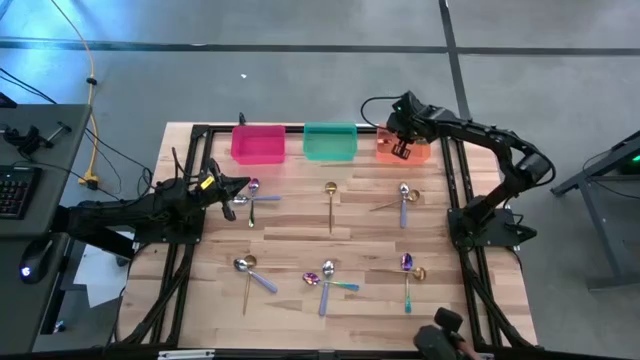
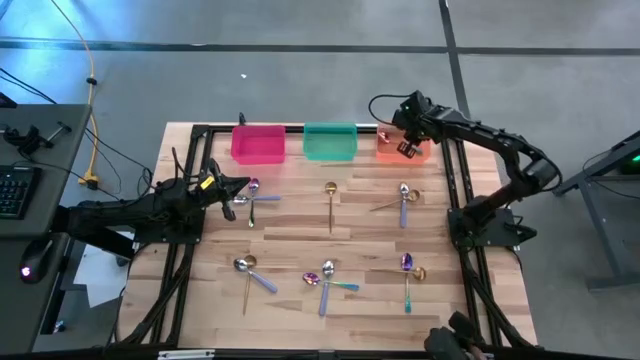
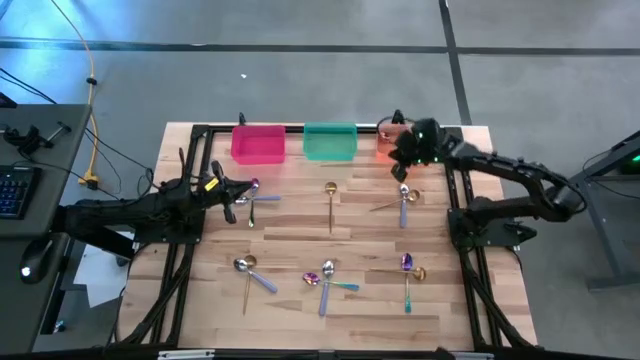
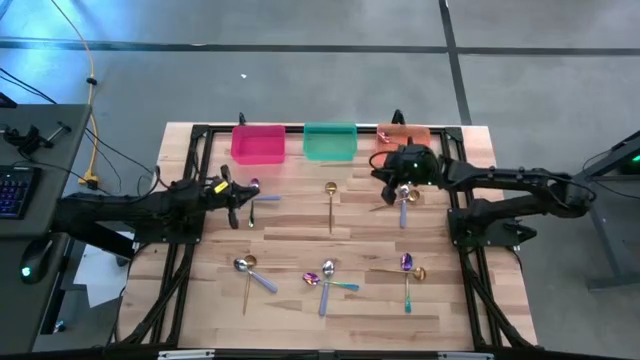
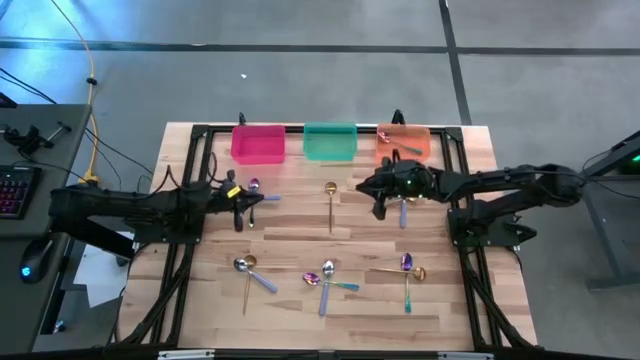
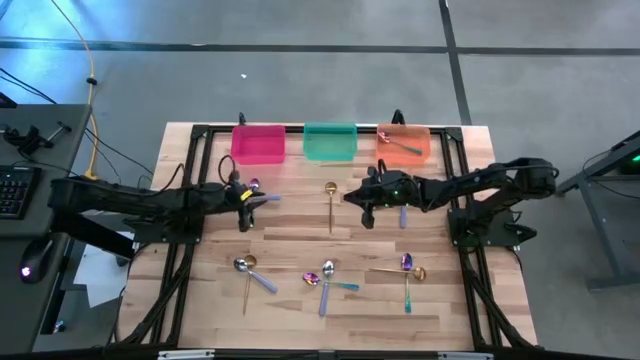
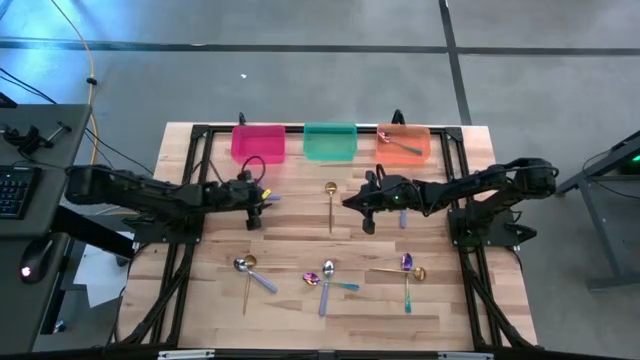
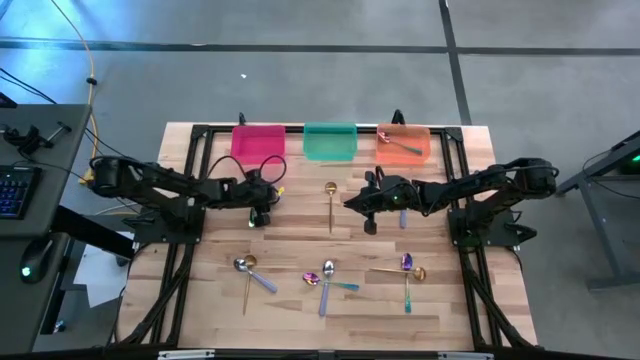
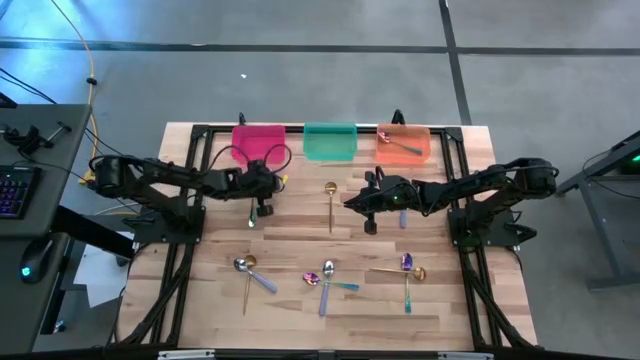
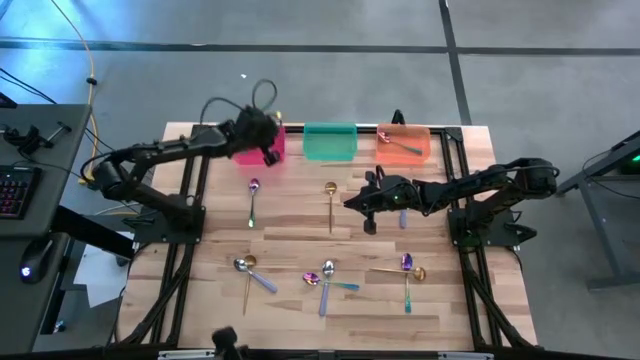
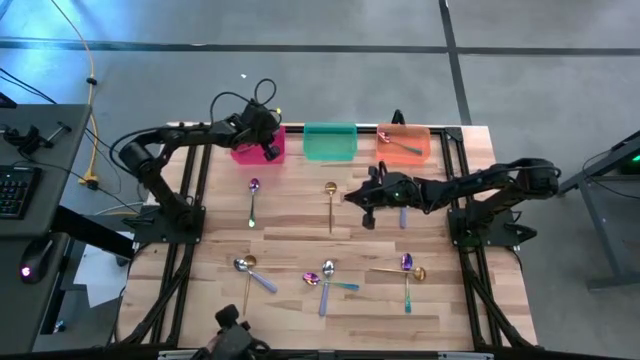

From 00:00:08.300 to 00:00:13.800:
Task: Sort silverware by color (type)
Put the top left purple spoon into the pink bin

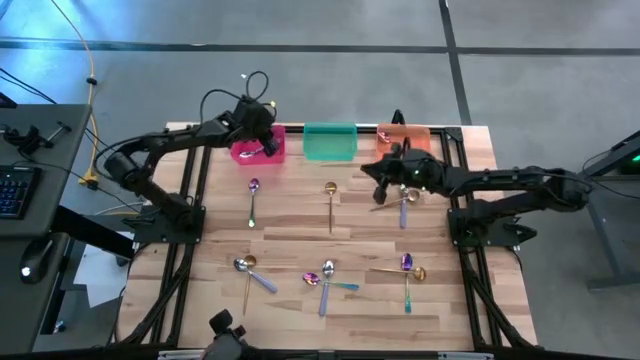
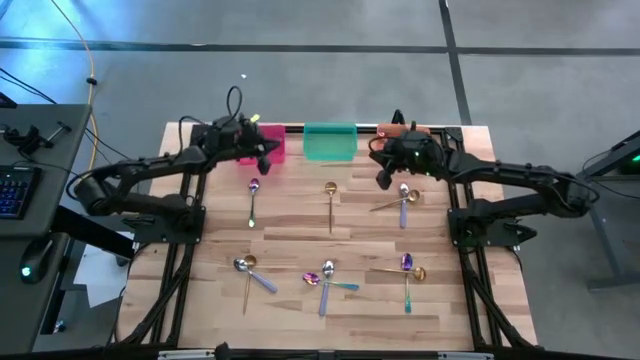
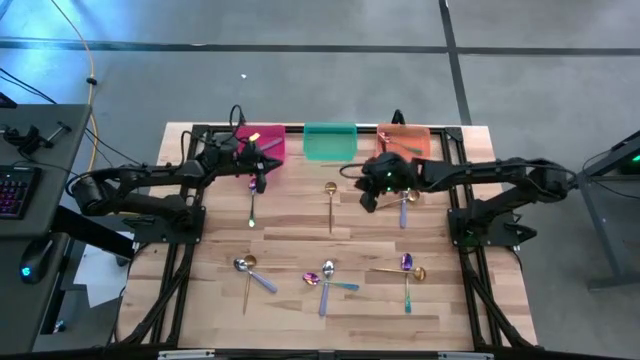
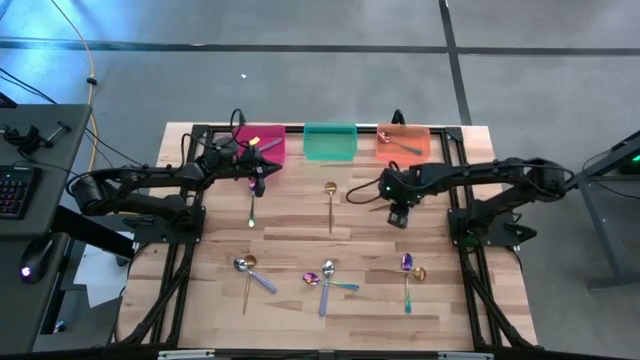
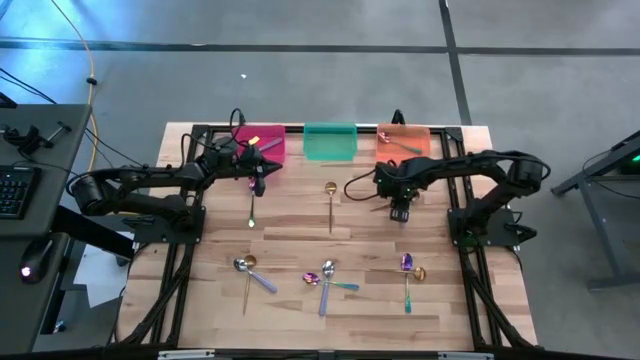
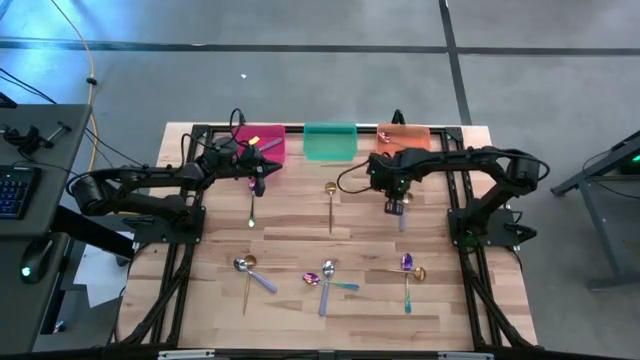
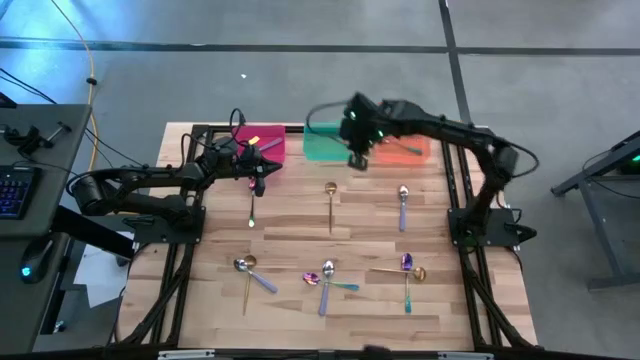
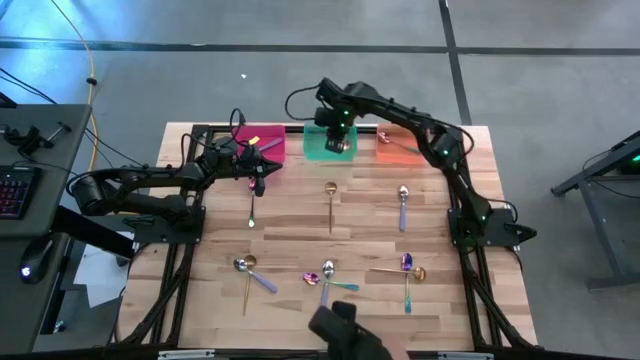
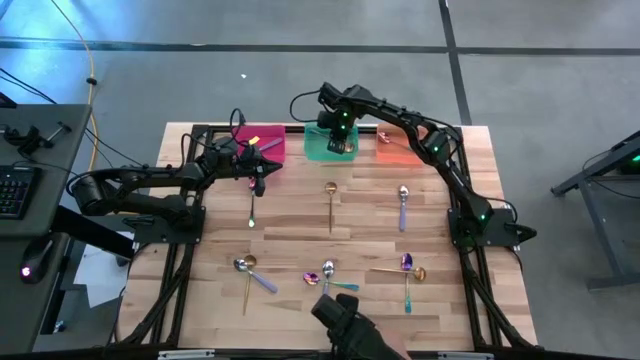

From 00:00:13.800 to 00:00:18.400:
Put the top right gold spoon into the green bin

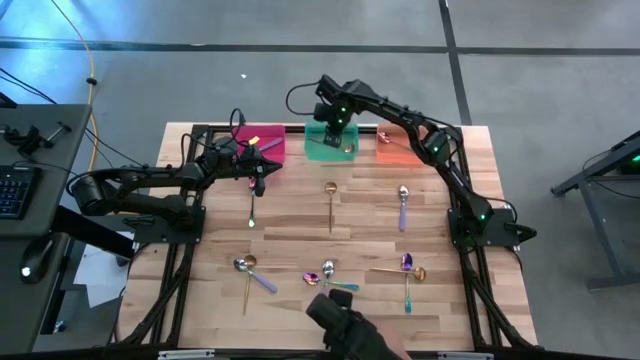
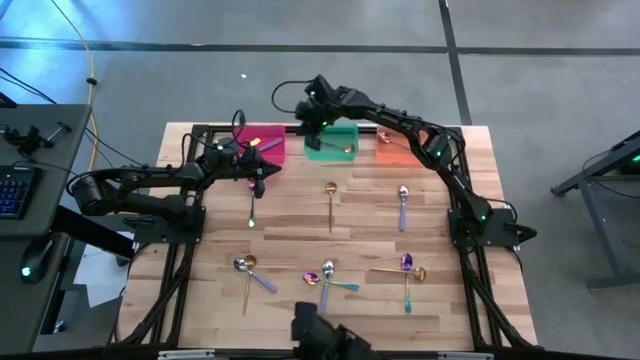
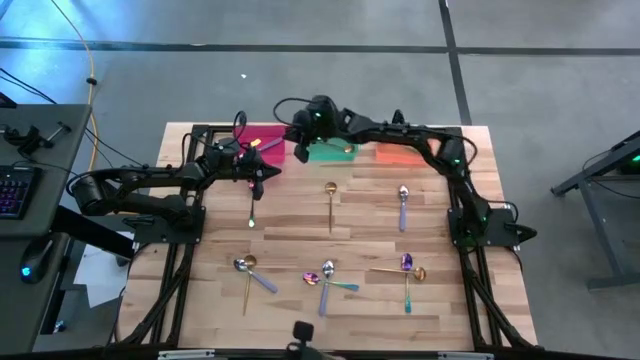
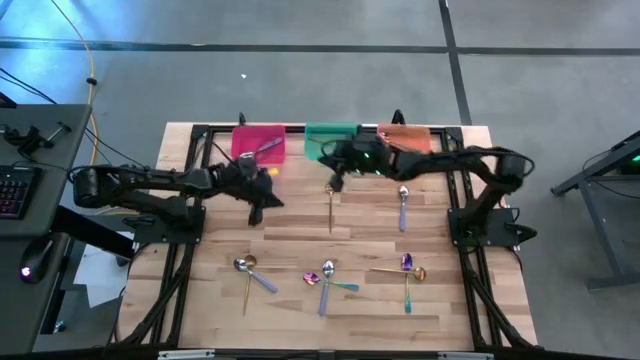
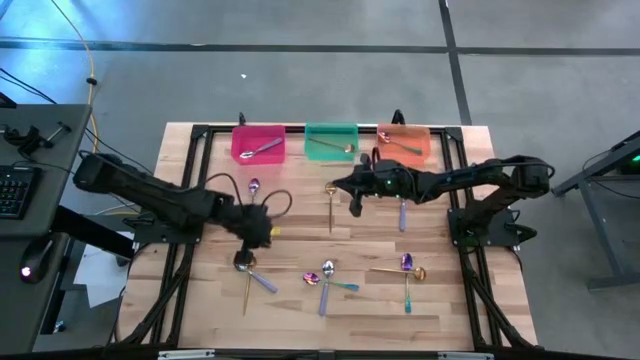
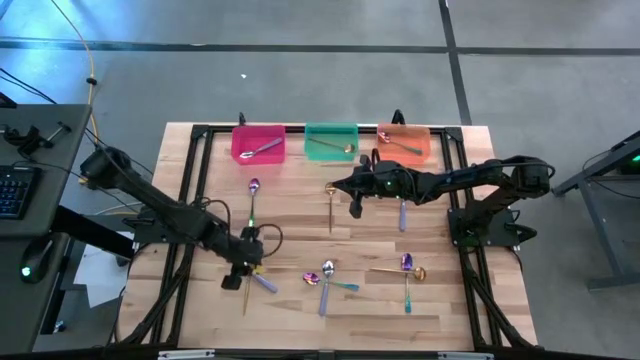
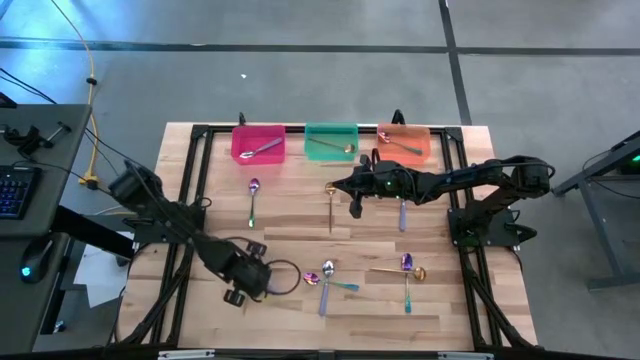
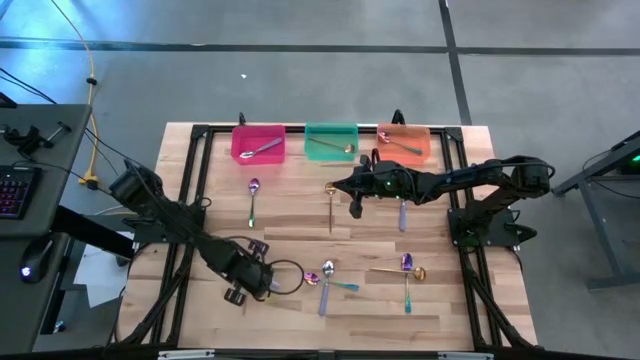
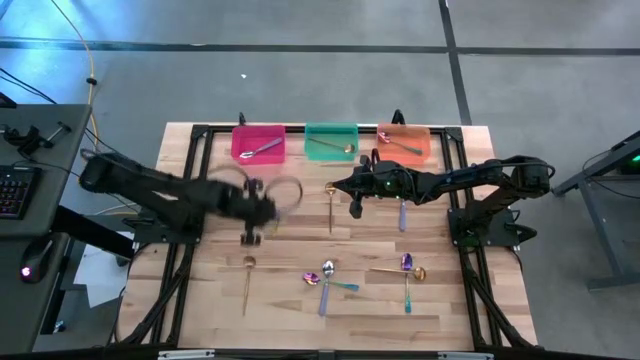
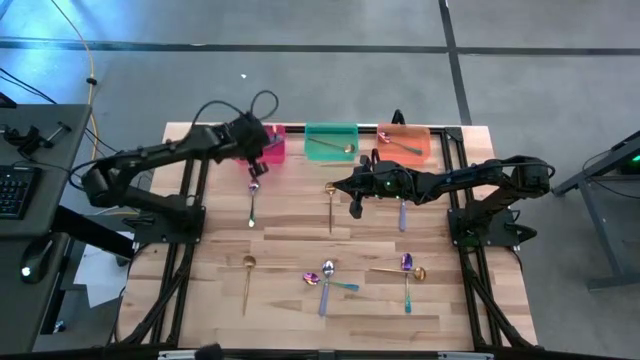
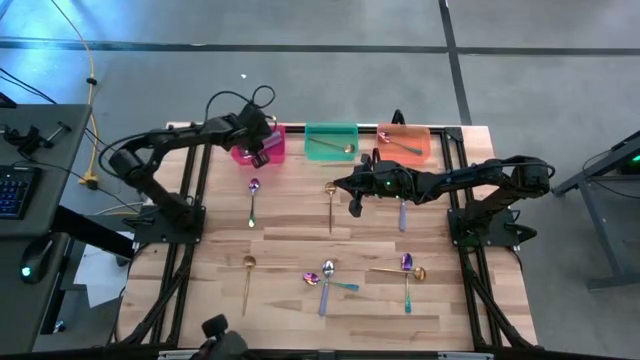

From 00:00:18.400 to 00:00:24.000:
Put the left purple spoon into the pink bin

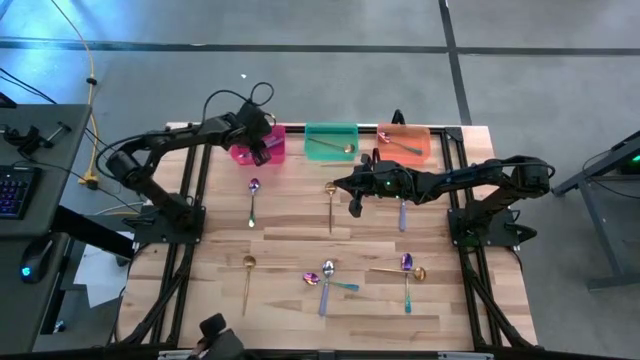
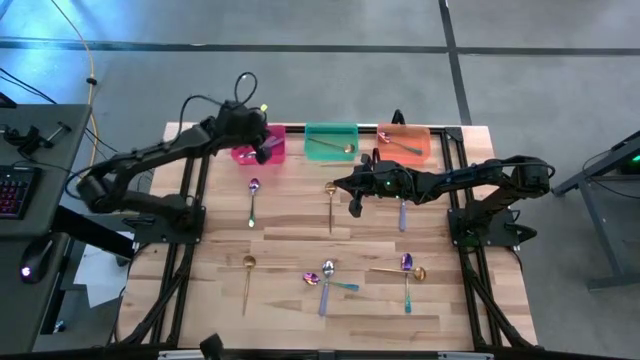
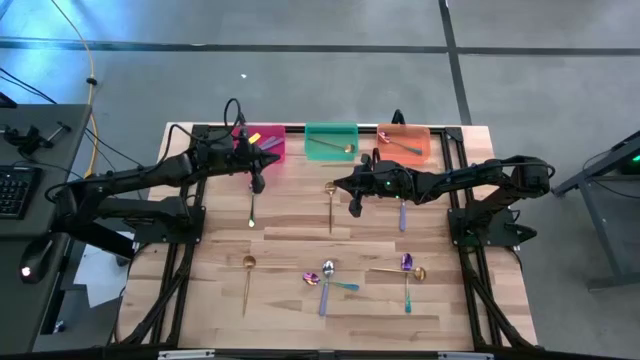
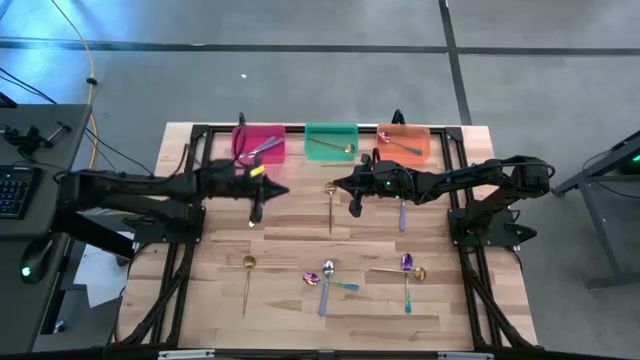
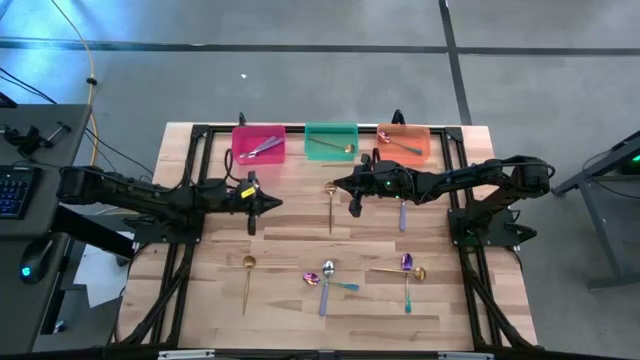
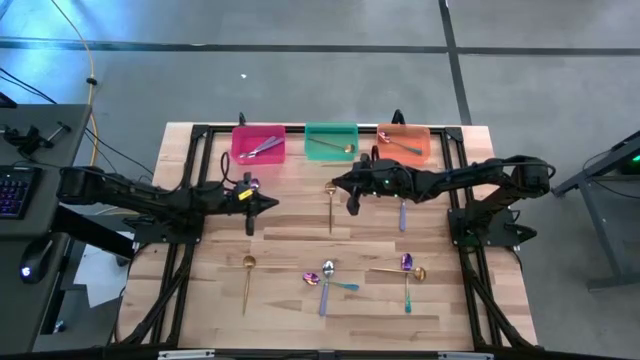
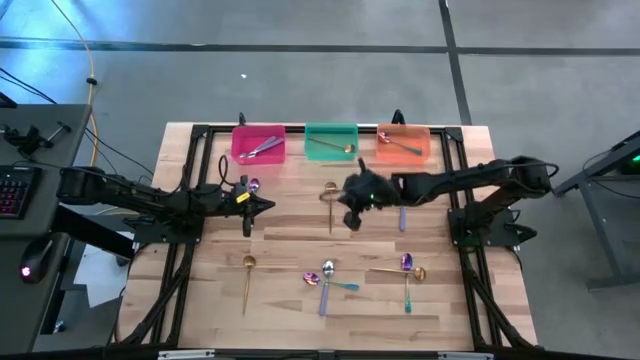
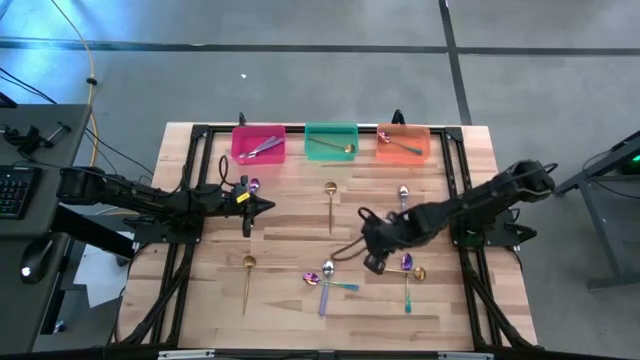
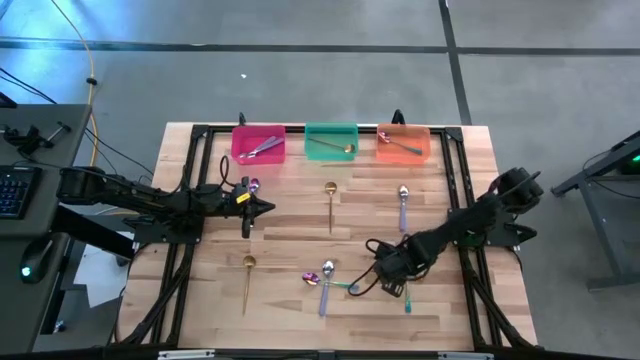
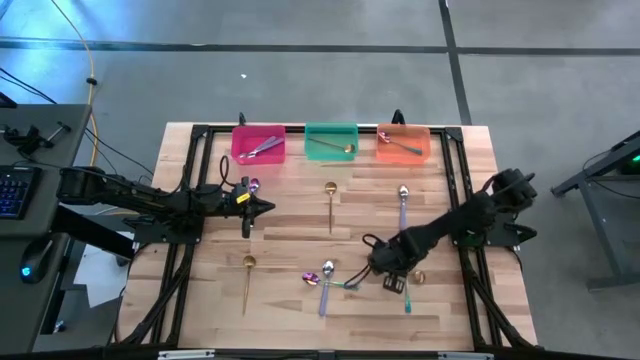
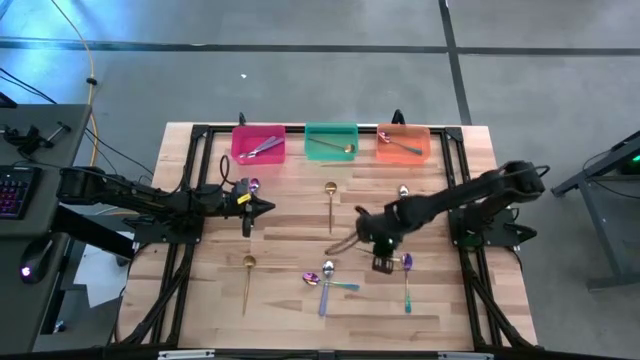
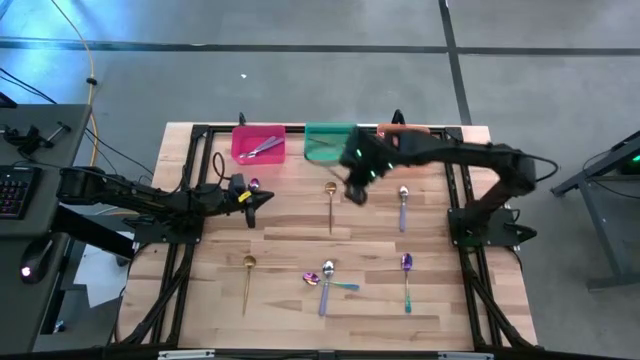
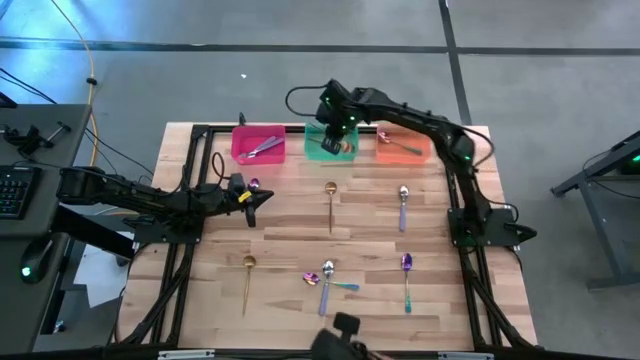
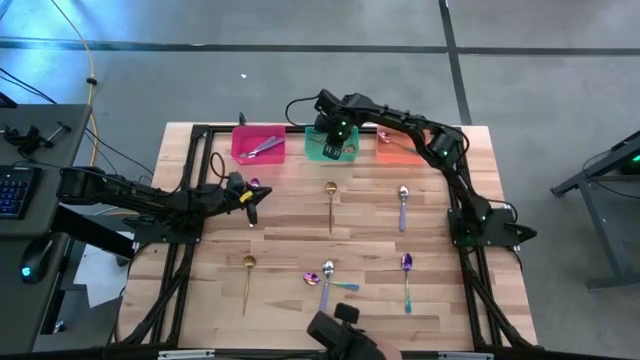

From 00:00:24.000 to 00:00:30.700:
Put the right gold spoon into the green bin
